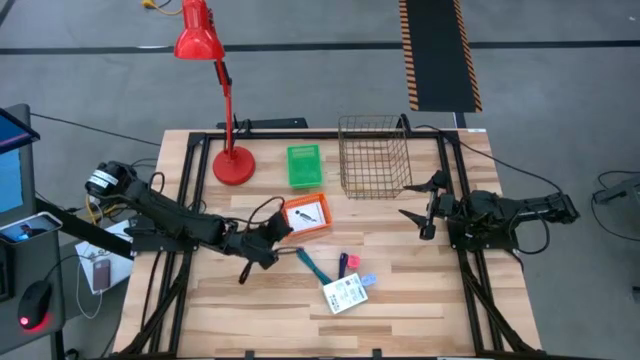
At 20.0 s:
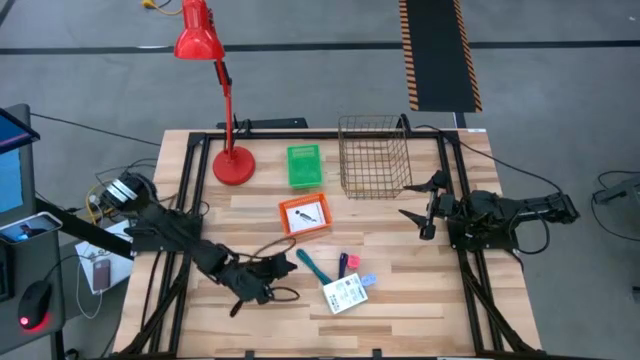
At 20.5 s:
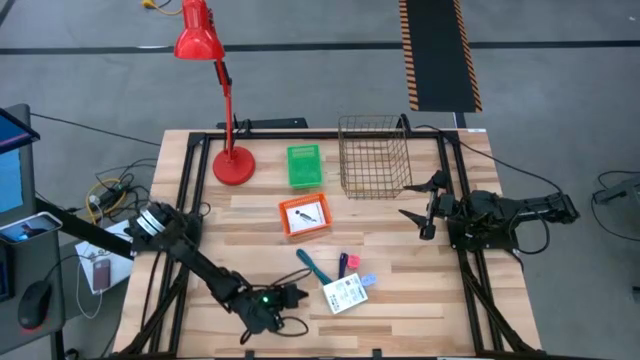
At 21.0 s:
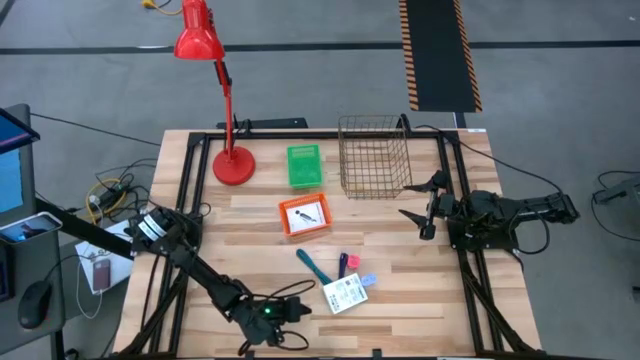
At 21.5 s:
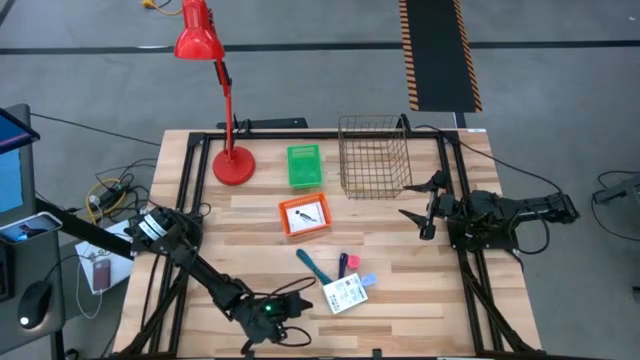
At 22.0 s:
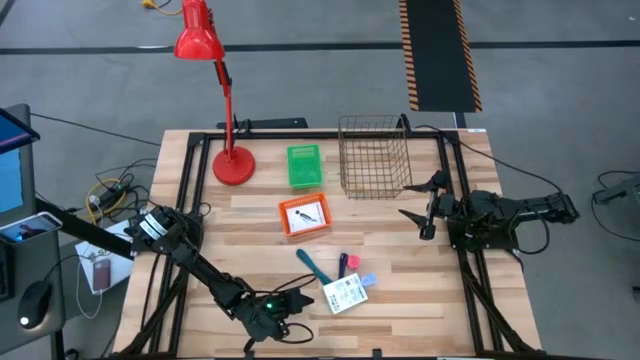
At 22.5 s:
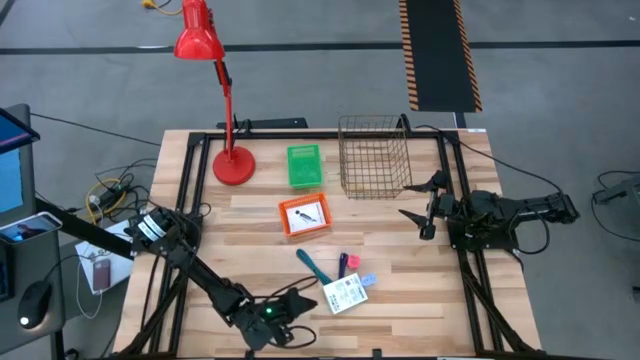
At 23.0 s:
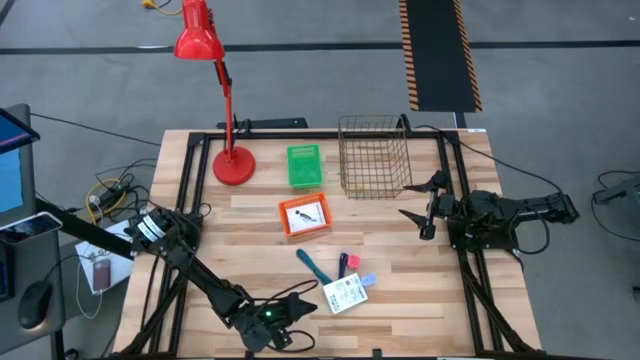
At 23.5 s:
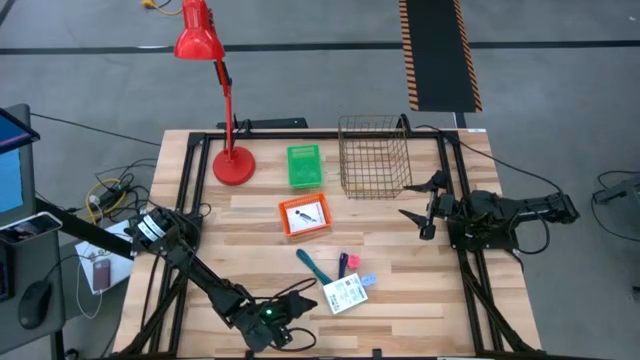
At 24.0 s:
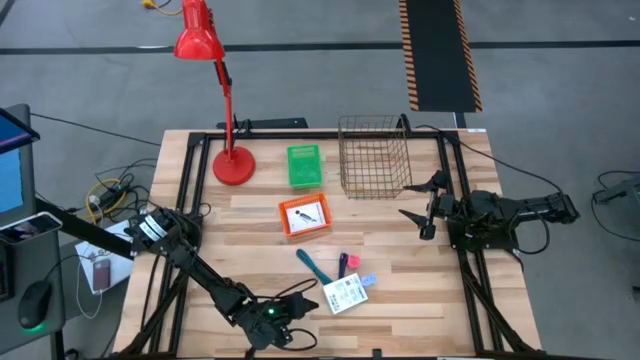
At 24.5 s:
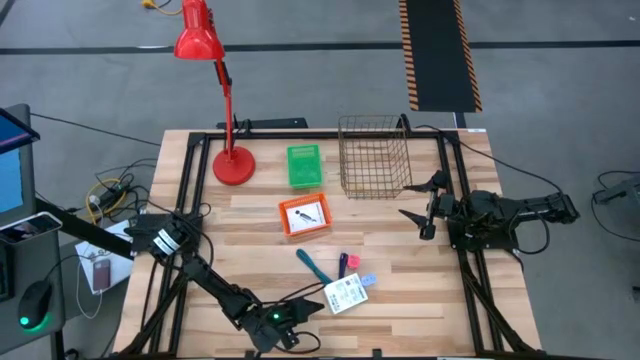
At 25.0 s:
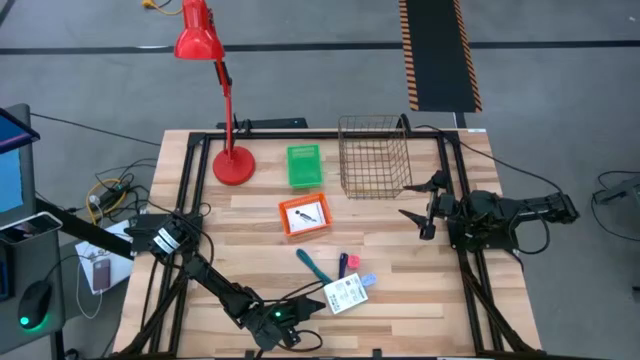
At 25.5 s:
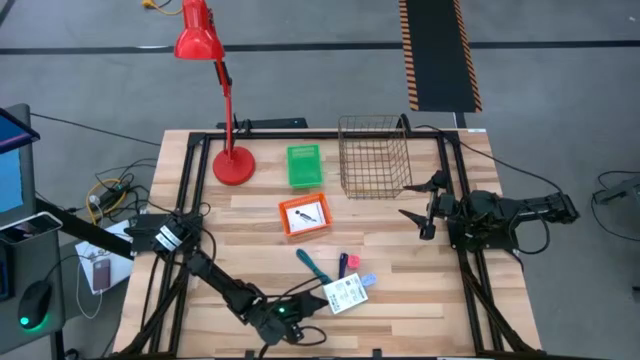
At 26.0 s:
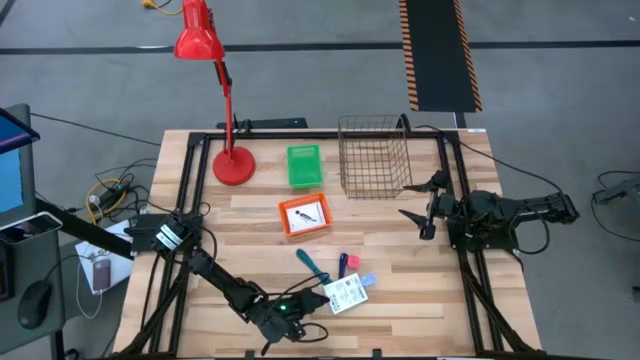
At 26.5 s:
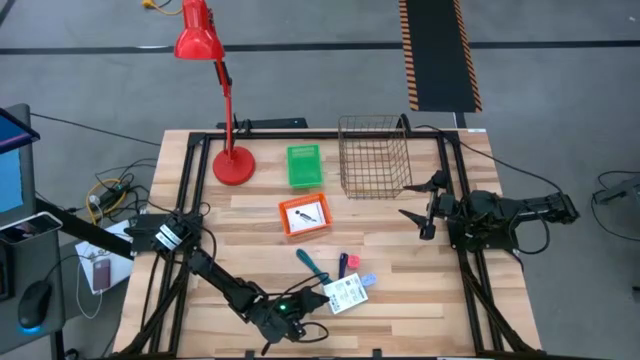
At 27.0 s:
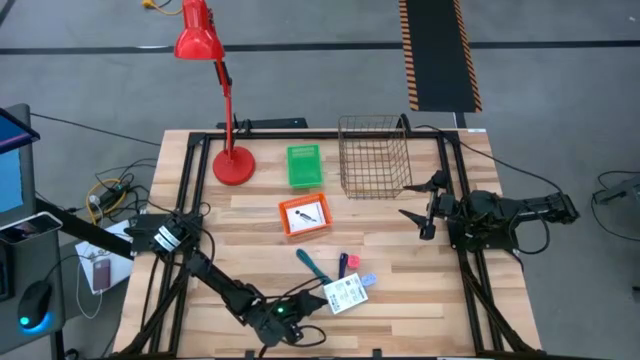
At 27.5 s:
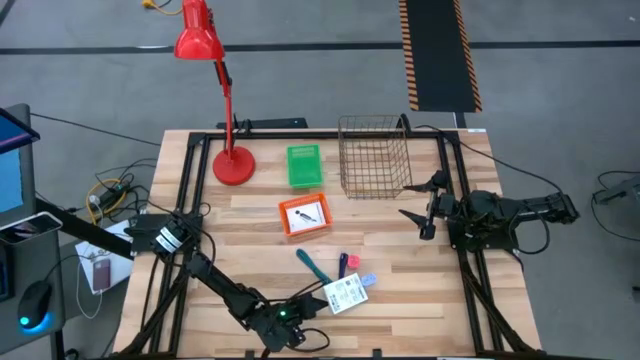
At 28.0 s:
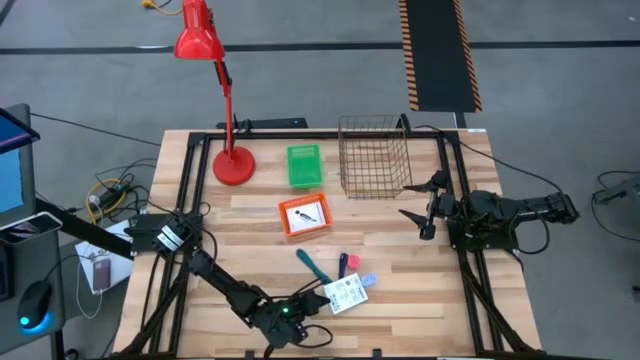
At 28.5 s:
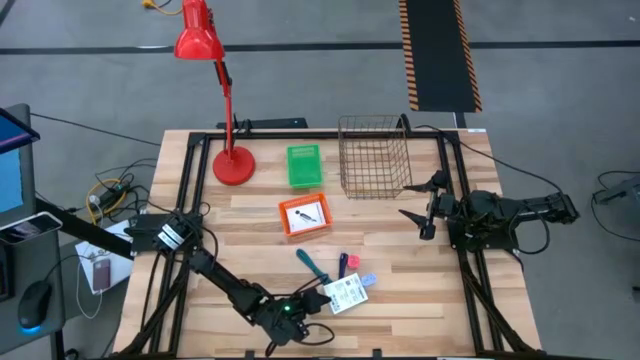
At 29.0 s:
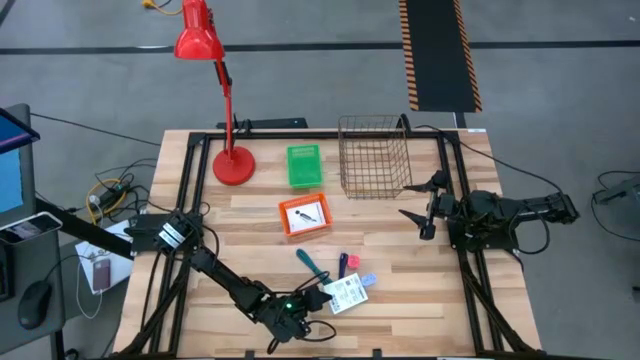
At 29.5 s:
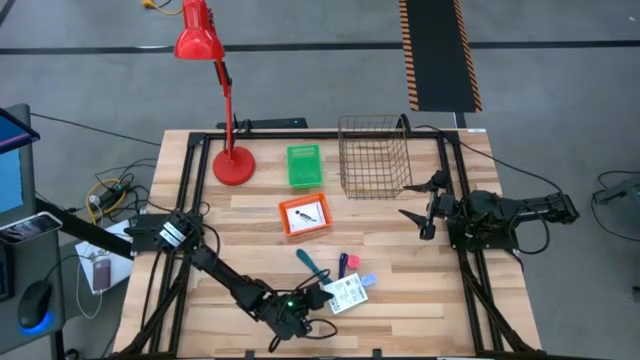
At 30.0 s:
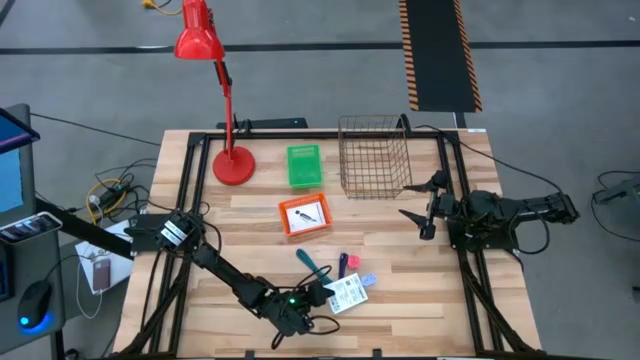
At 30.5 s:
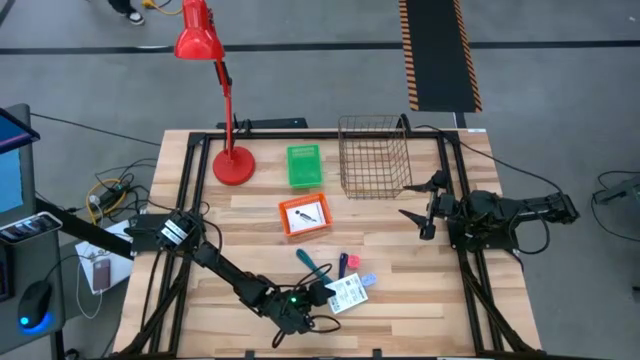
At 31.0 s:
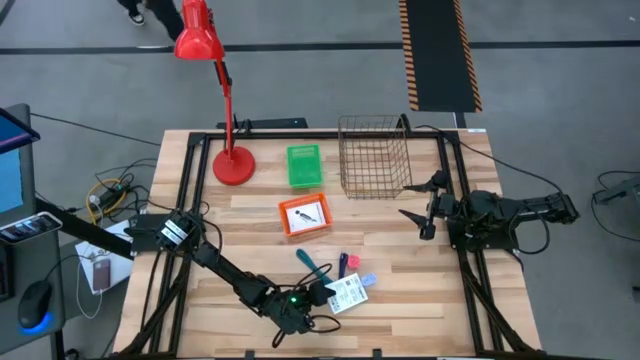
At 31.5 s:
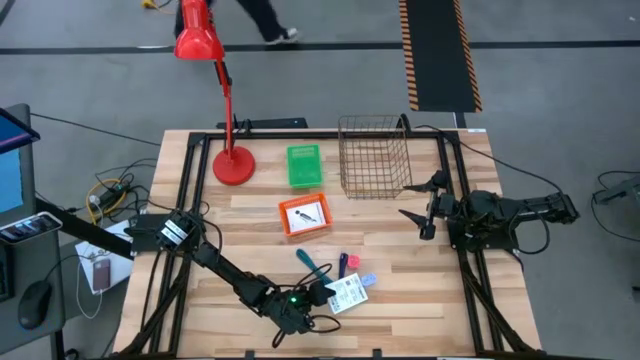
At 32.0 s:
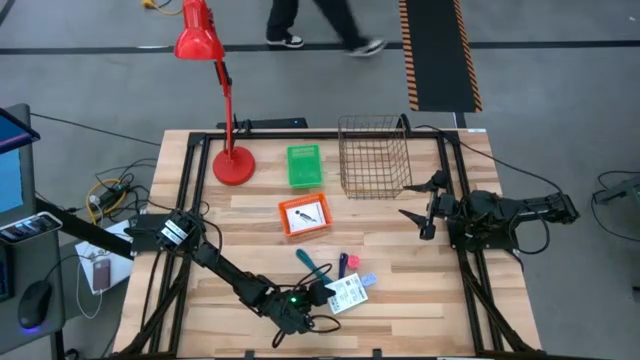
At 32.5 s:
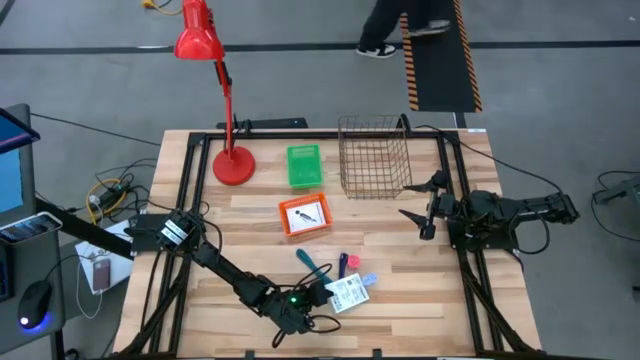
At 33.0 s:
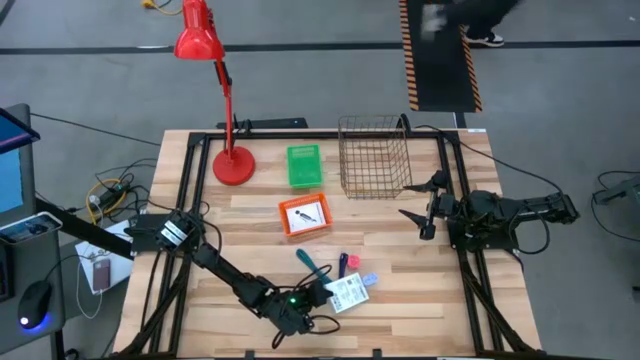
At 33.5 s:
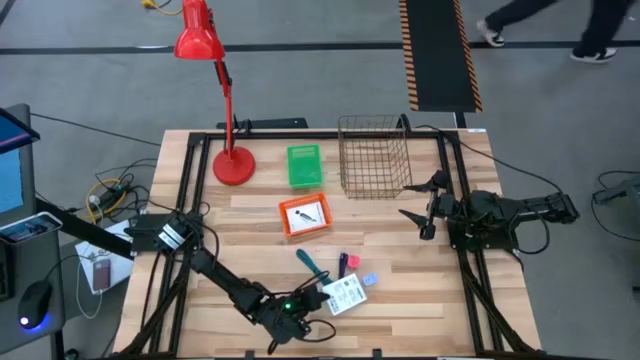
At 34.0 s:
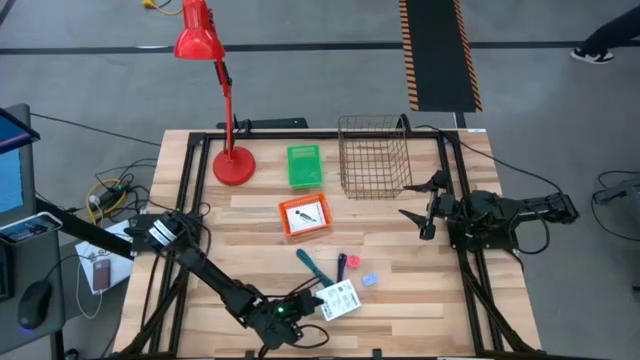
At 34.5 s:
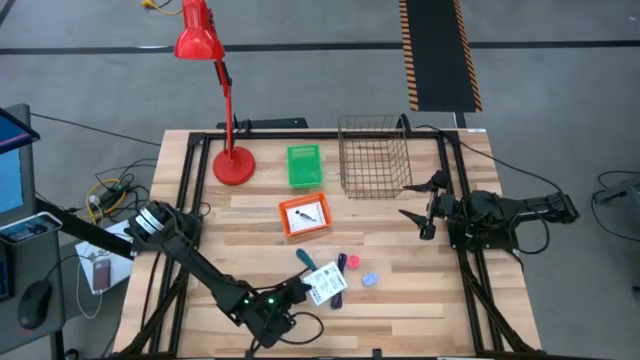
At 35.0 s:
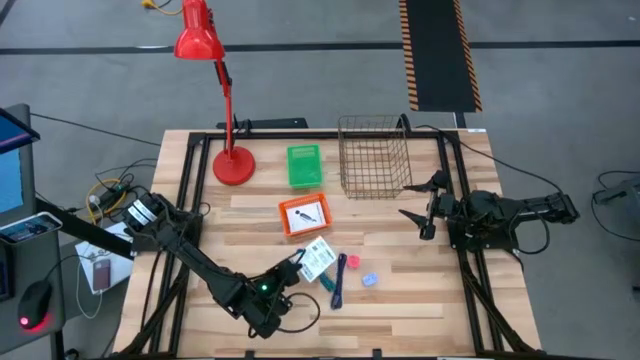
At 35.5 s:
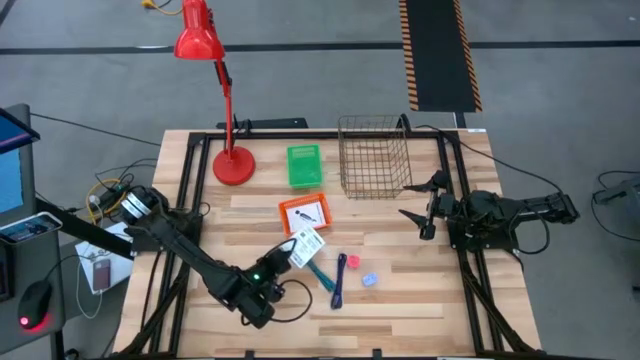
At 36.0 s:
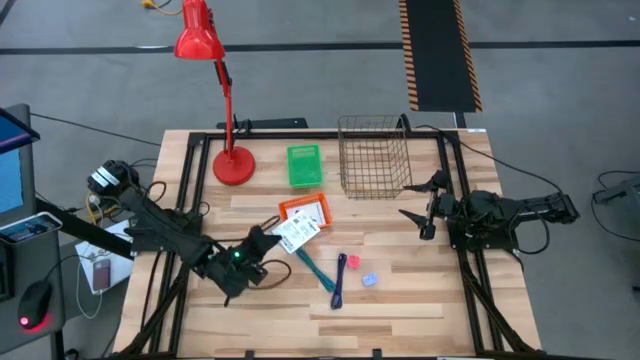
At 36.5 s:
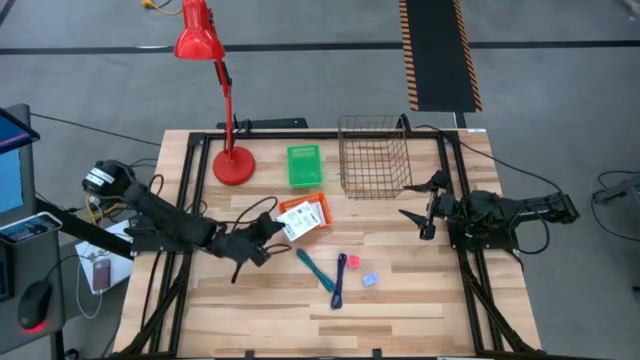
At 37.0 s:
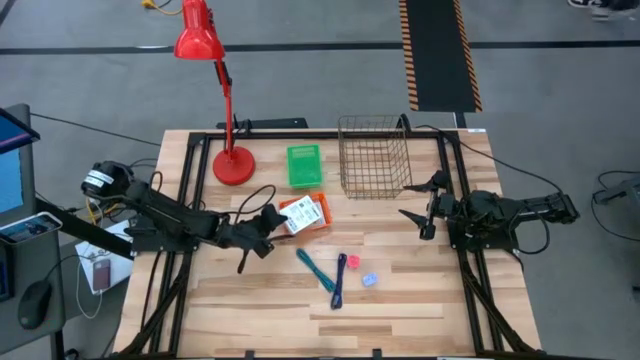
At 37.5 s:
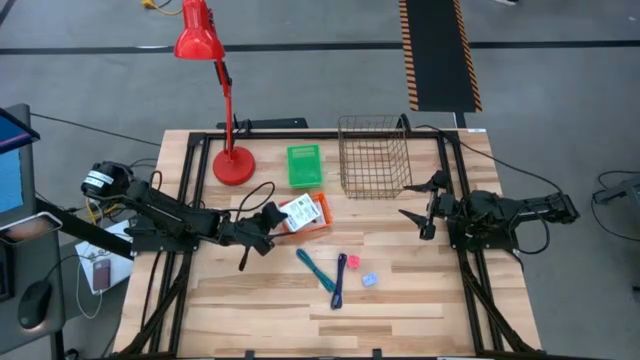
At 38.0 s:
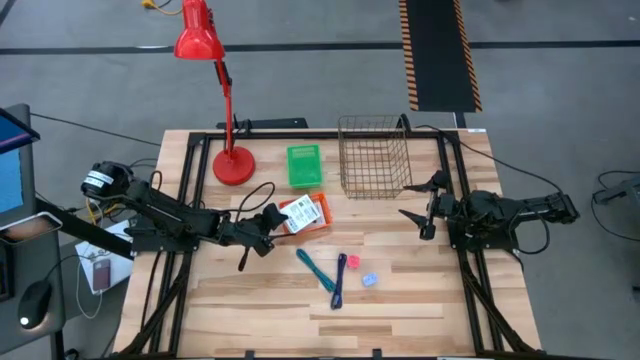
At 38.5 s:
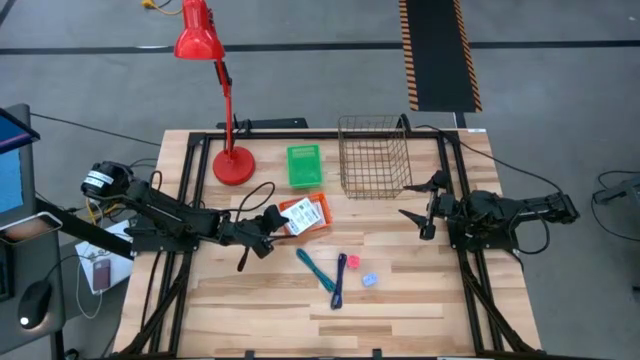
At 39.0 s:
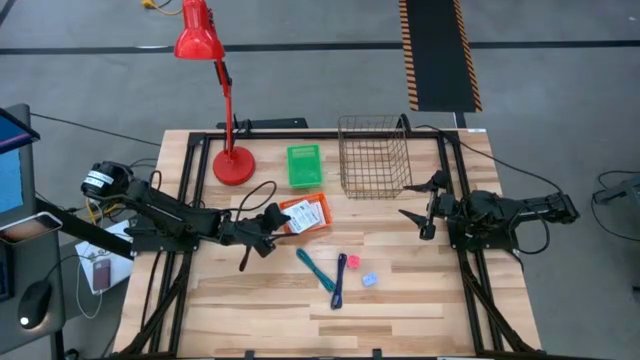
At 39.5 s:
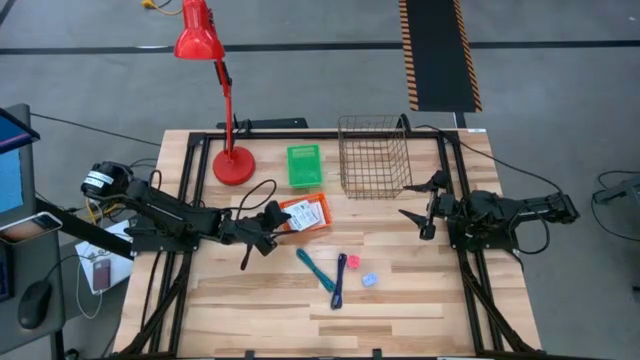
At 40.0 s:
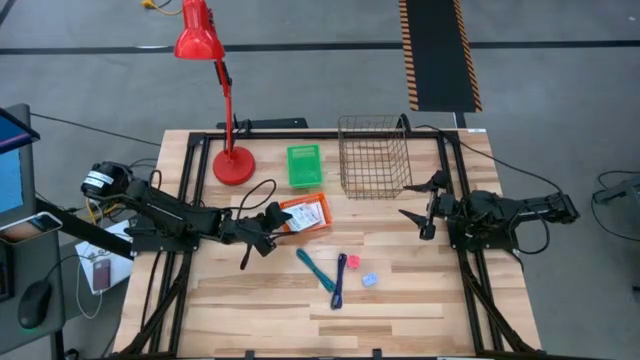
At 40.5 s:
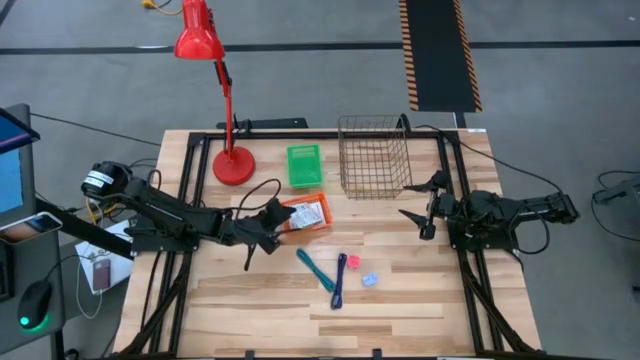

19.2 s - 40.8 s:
Task: Pick and place items into bin
Put the white box into the orange bin
